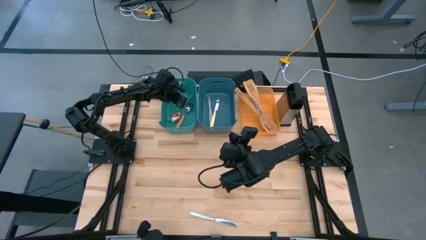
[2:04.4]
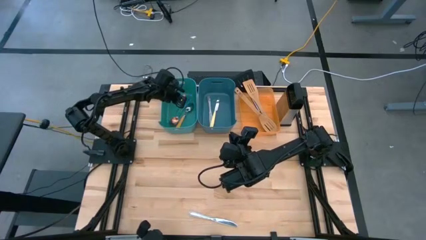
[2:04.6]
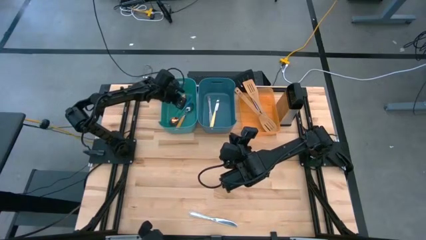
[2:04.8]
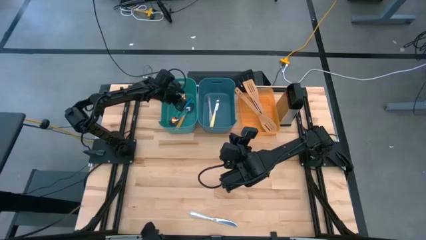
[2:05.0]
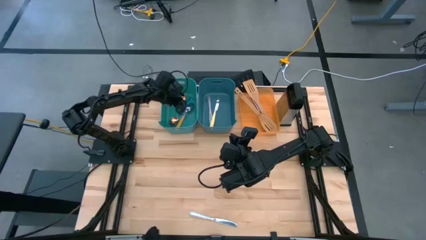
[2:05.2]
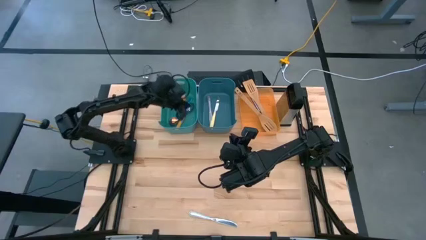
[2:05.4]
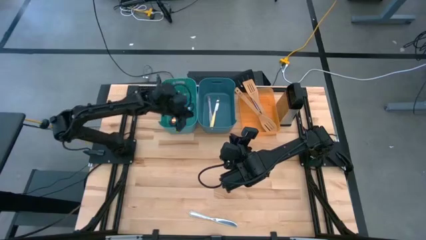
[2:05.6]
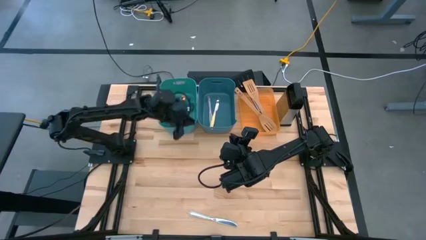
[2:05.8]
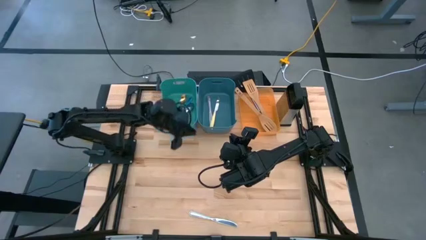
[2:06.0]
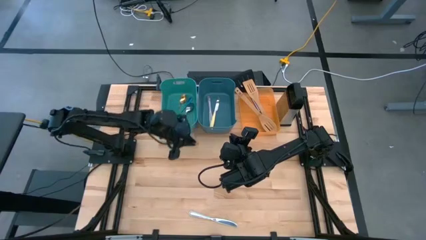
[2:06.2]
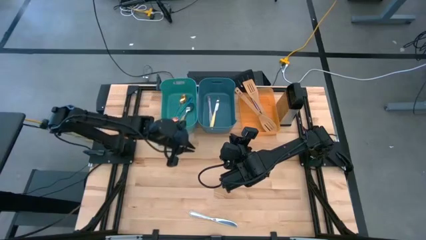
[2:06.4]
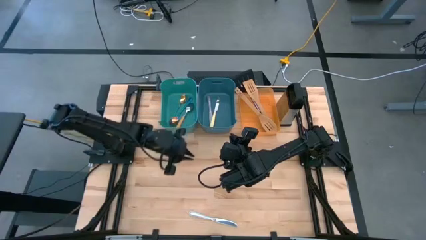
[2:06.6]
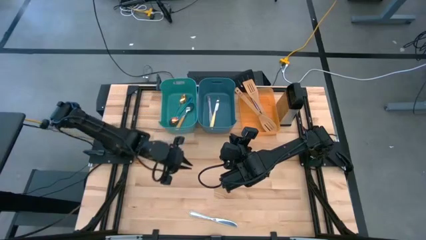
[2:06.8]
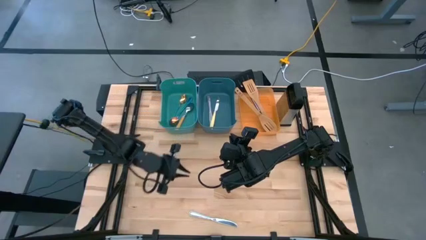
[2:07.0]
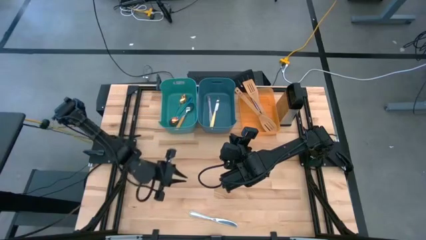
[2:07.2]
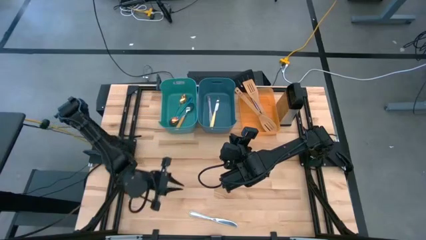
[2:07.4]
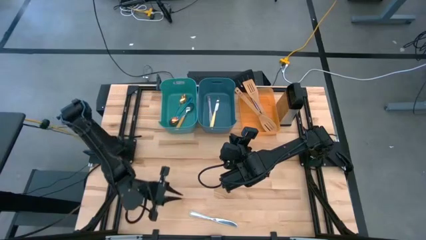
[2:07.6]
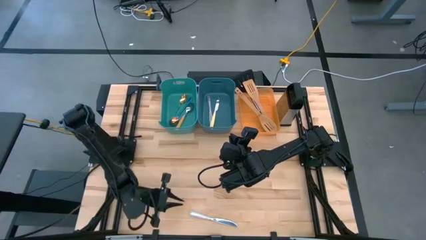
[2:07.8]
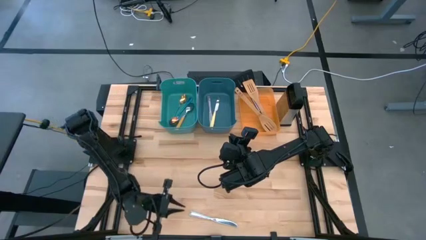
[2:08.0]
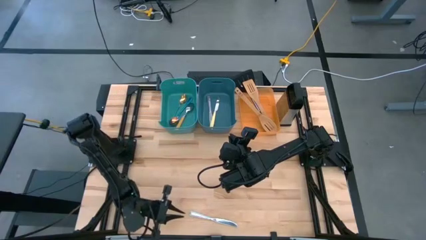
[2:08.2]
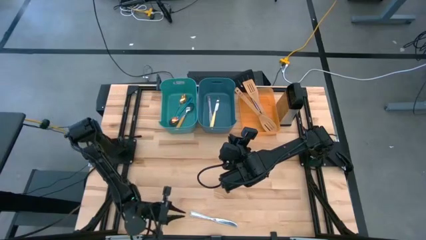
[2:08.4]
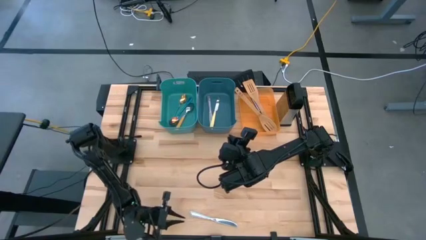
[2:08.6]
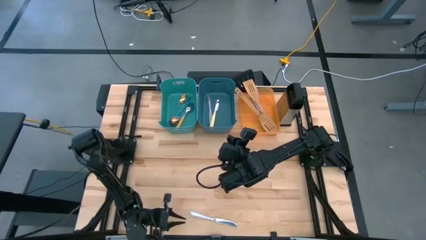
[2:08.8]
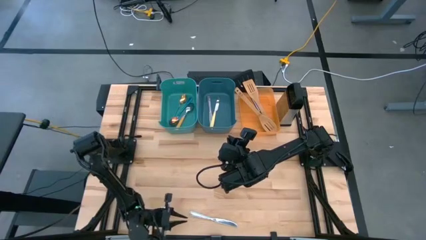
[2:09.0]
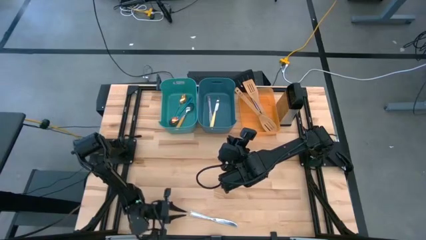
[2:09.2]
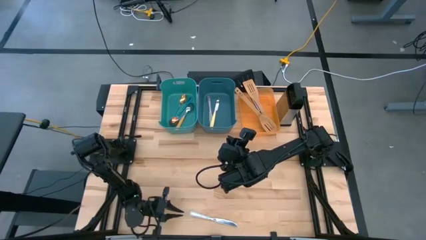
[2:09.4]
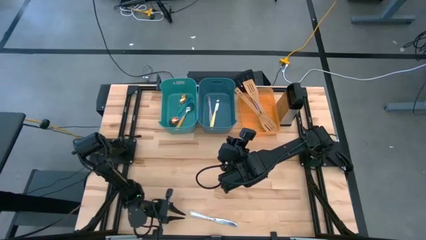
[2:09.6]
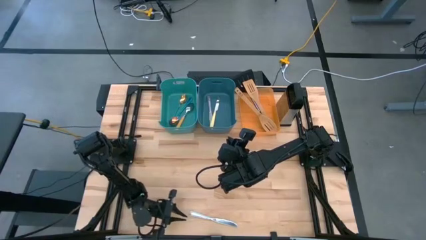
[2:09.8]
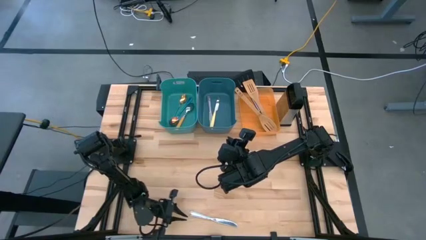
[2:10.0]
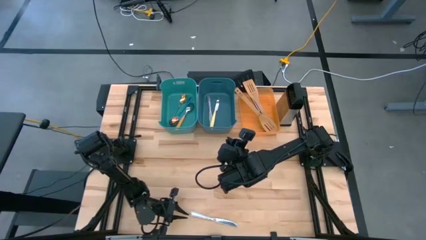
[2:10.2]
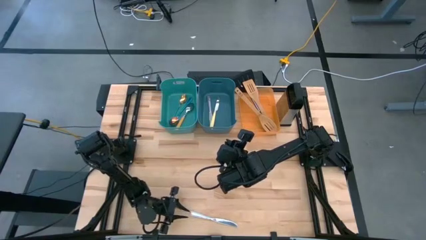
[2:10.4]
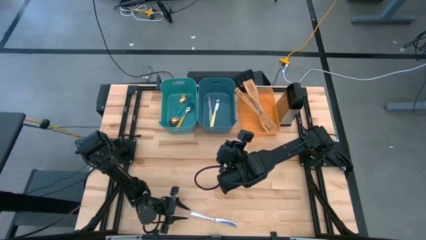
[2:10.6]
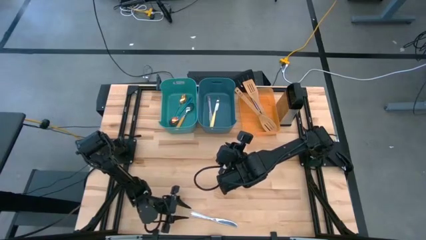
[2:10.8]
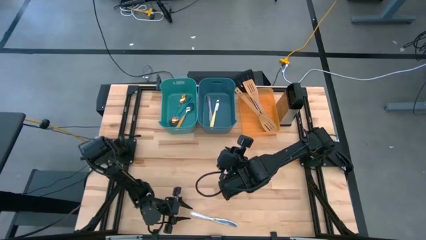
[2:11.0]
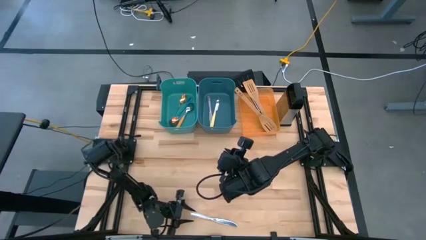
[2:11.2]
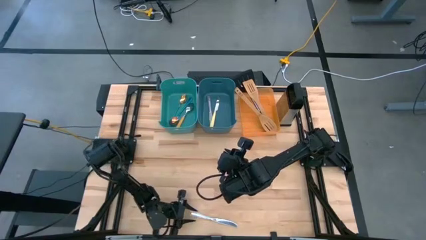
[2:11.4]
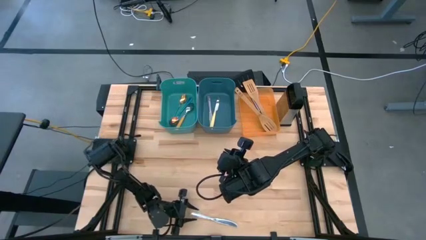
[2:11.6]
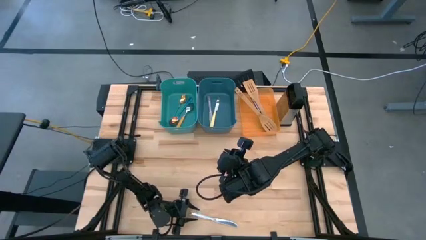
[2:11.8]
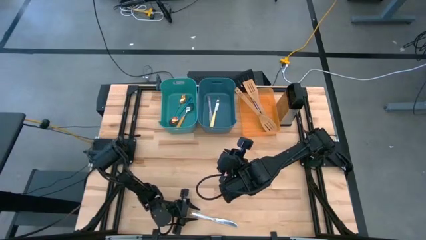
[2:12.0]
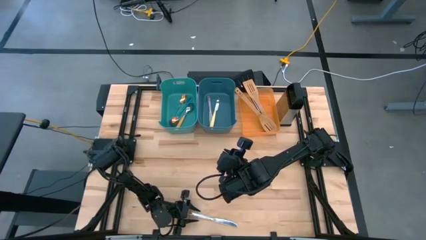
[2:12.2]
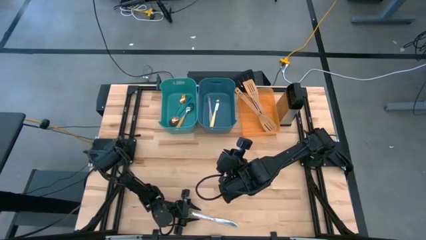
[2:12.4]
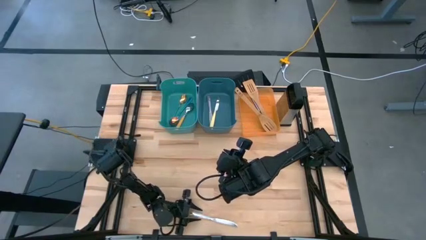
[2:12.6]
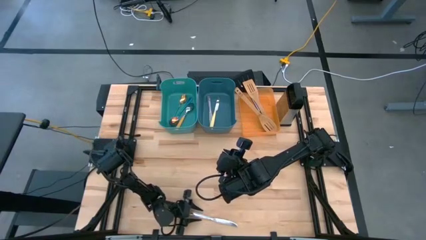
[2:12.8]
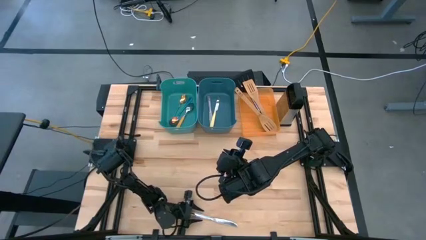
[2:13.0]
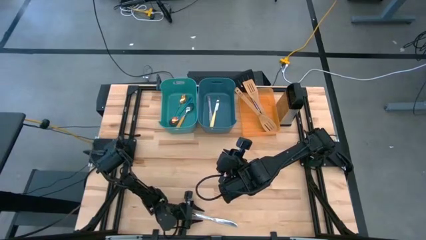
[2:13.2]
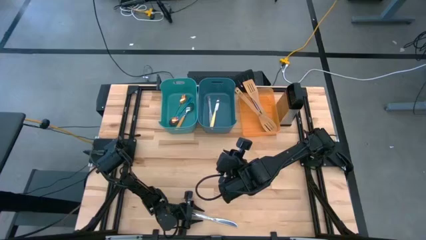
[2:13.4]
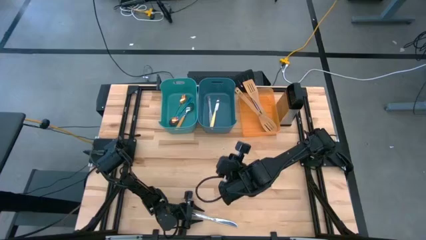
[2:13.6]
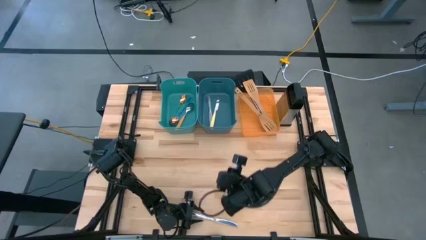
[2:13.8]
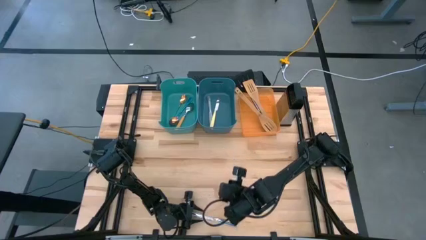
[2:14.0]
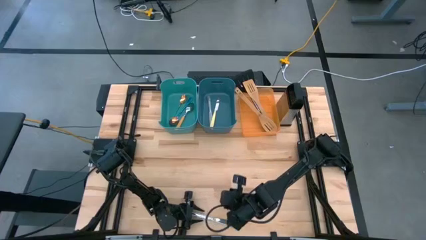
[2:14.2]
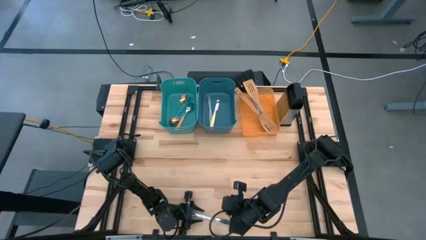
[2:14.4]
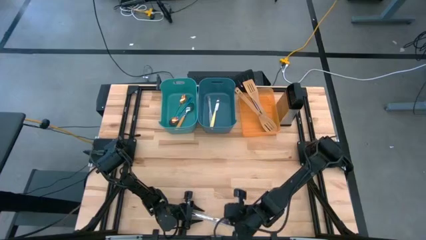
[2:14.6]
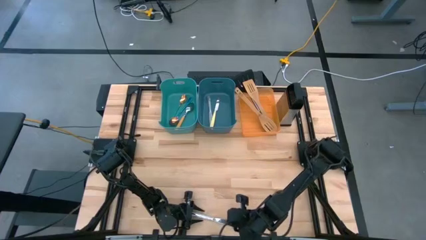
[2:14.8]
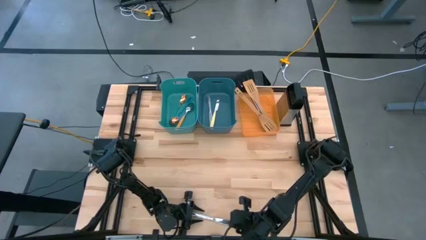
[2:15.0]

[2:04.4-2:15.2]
Task: Pick & Place Kitchen Items
Put the silver table knife into the blue bin

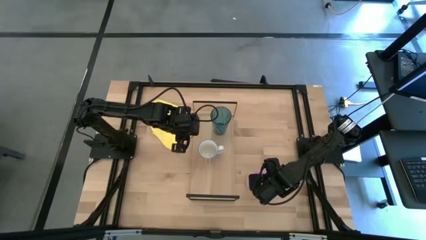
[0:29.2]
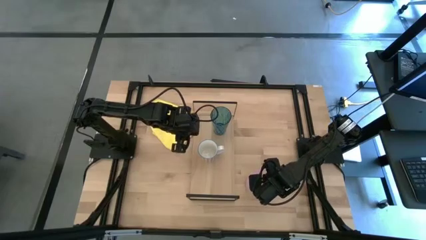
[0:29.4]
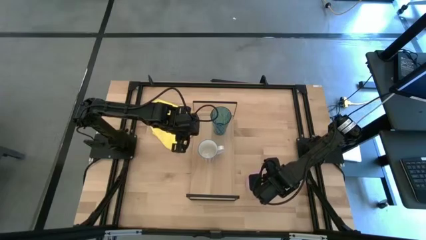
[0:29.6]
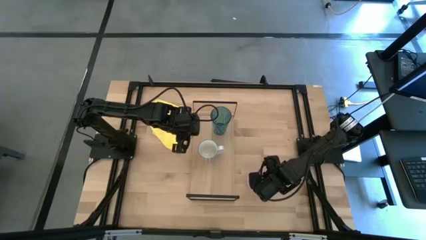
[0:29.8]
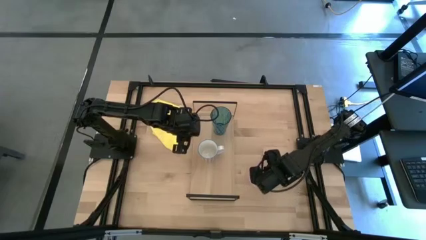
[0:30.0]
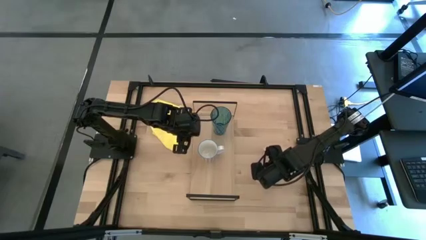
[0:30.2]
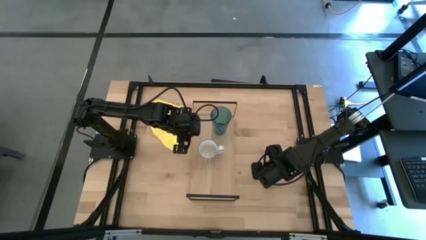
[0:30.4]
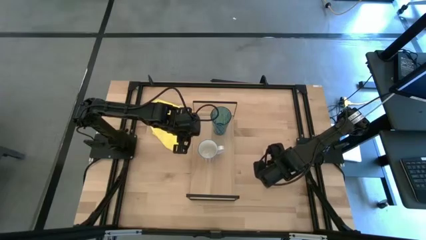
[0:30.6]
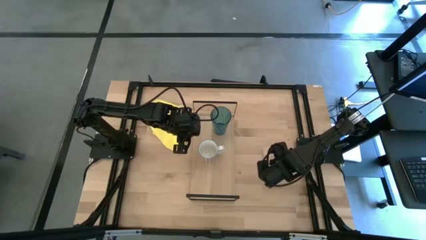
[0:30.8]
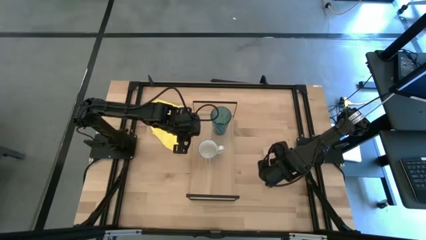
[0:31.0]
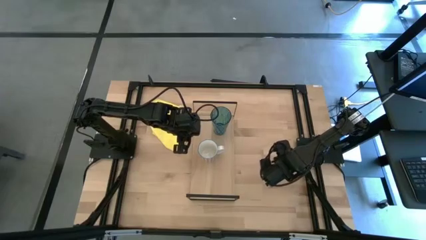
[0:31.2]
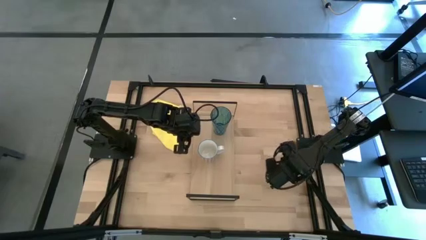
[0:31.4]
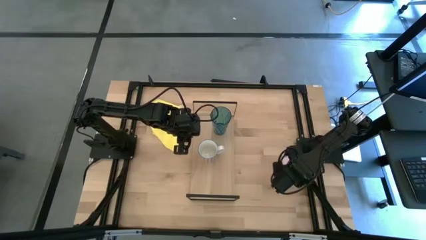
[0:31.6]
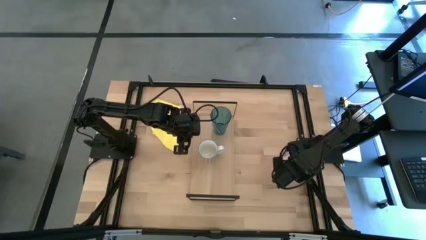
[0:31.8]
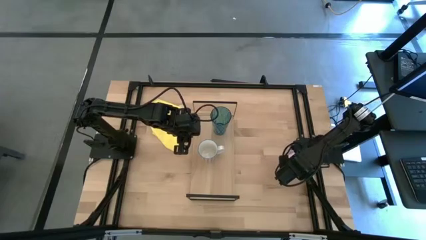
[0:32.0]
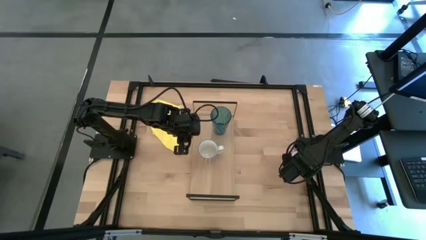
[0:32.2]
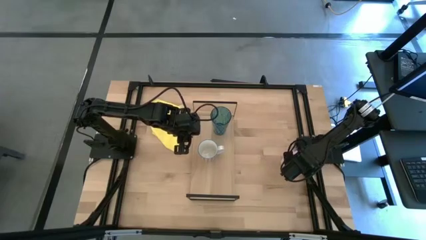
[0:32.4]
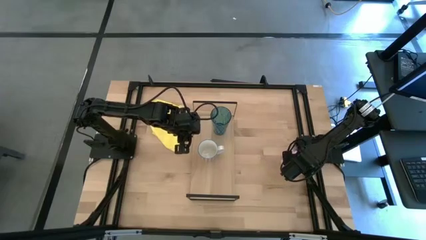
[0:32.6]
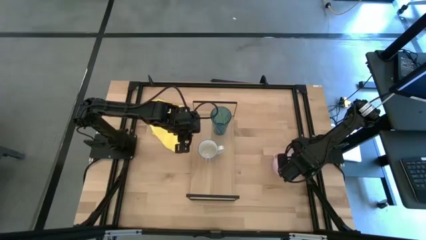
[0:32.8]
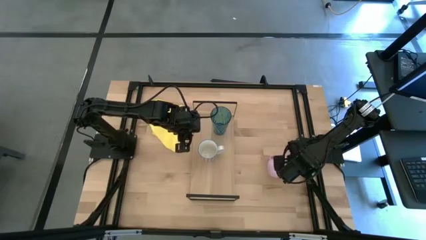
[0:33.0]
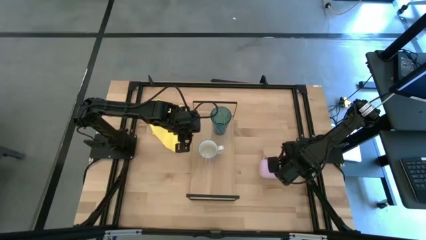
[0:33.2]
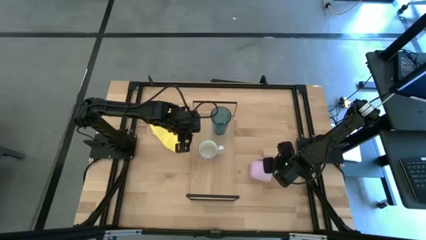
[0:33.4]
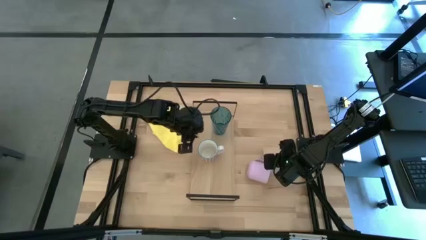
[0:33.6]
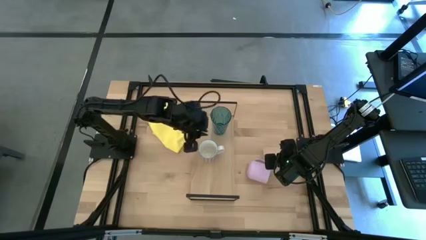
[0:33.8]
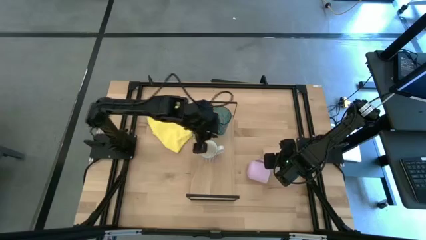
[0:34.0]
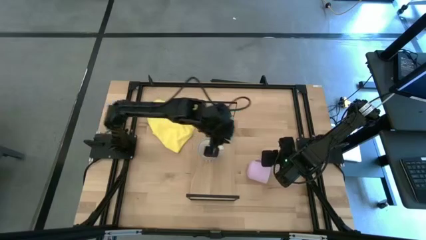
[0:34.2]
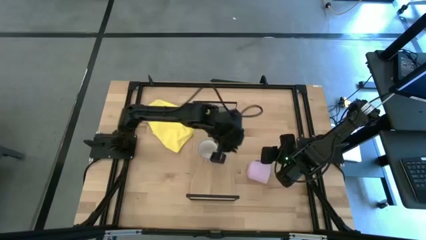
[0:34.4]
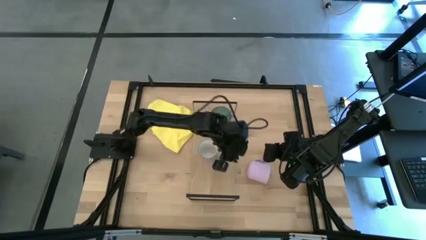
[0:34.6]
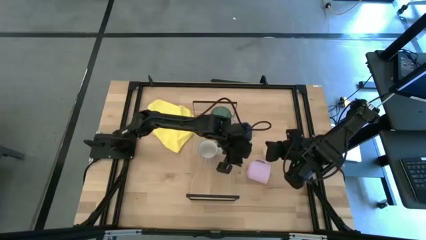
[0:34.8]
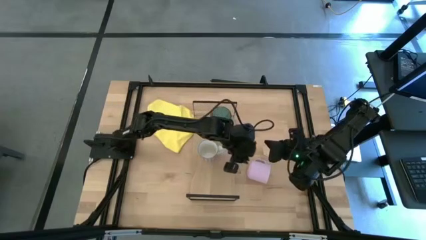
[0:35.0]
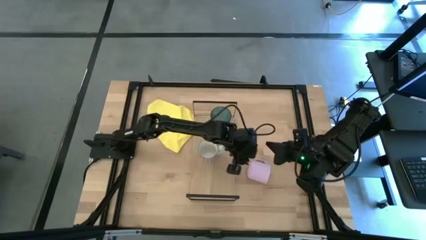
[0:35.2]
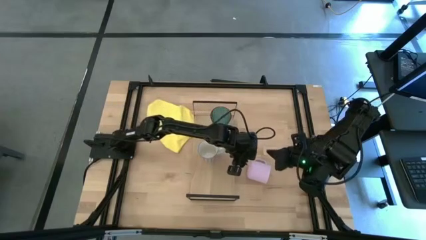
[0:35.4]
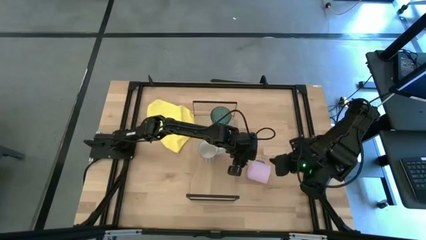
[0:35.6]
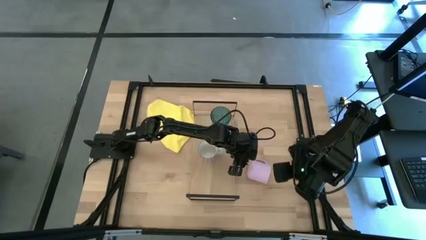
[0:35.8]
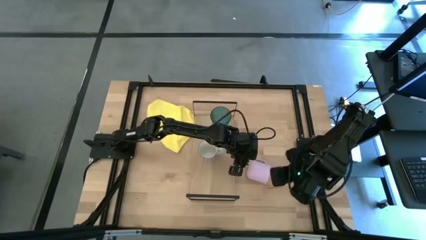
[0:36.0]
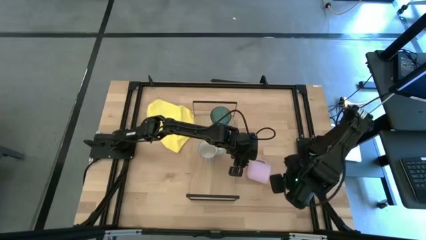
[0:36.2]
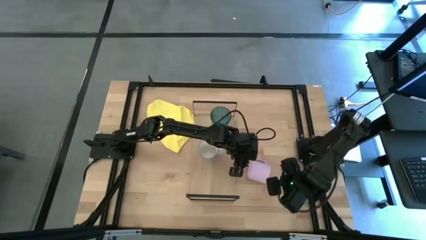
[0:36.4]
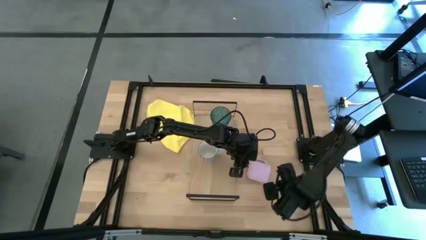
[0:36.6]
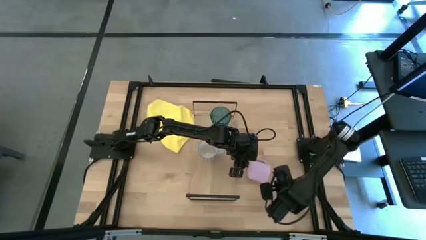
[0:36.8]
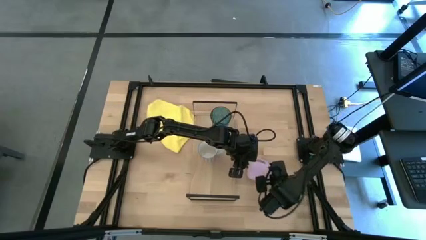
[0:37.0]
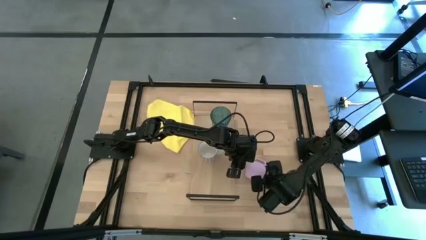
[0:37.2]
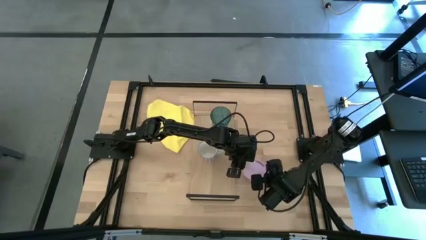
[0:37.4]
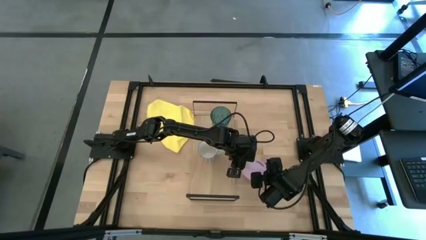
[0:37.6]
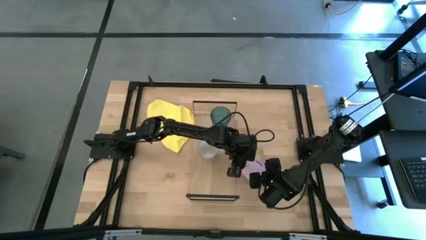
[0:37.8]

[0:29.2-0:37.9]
Task: Stack small to large cups/mugs on shelf
Put the pink mug on the shelf
